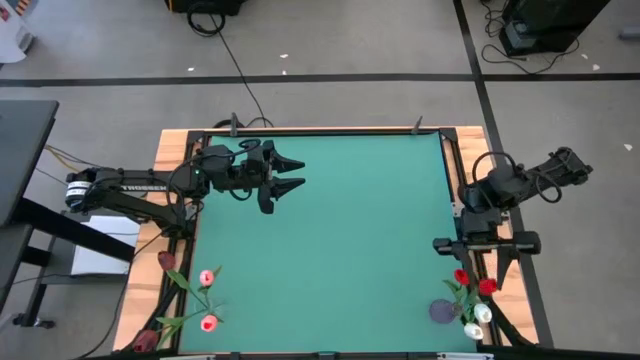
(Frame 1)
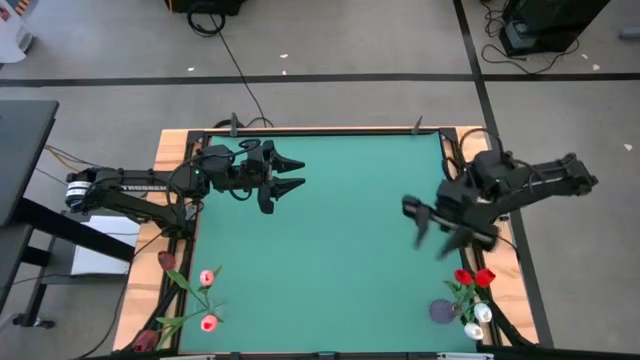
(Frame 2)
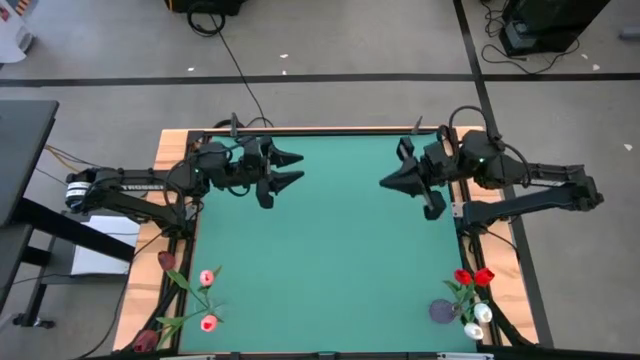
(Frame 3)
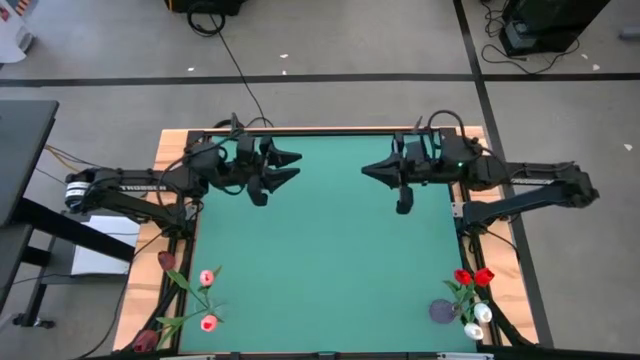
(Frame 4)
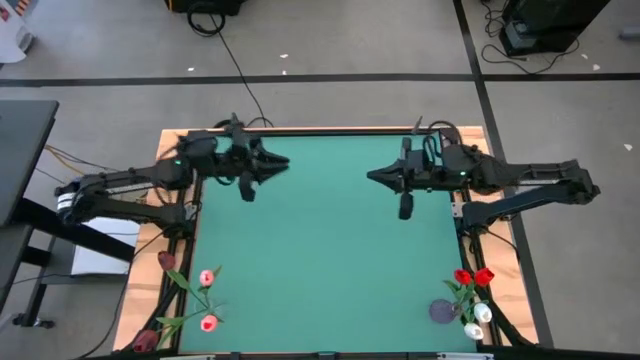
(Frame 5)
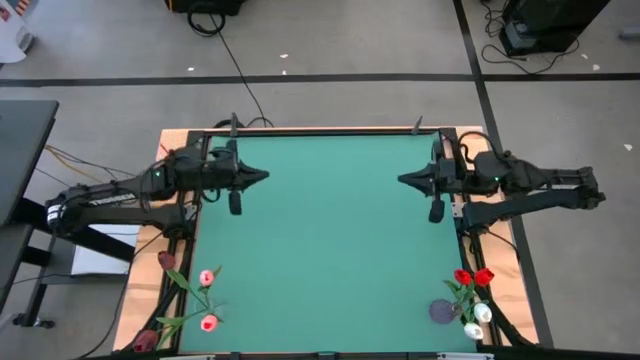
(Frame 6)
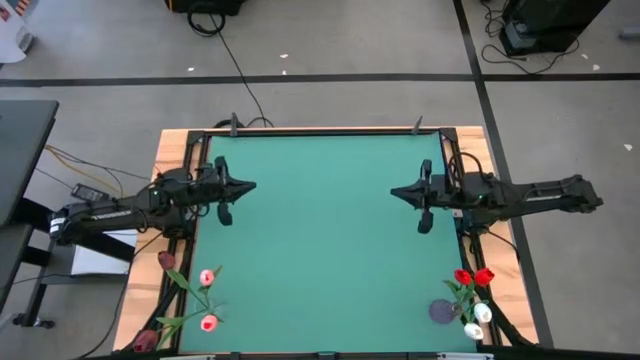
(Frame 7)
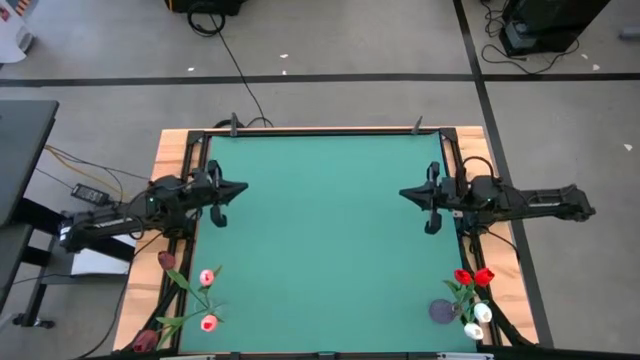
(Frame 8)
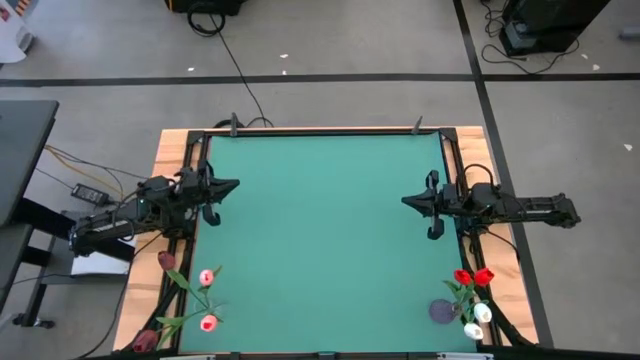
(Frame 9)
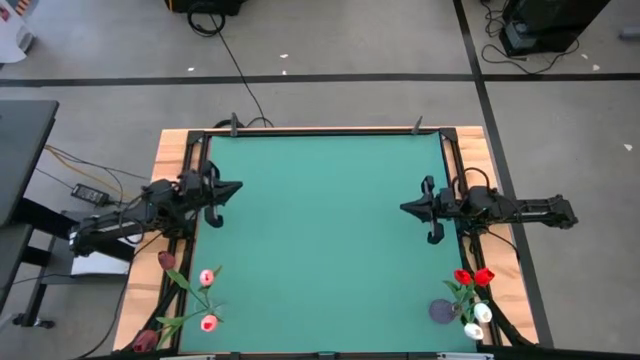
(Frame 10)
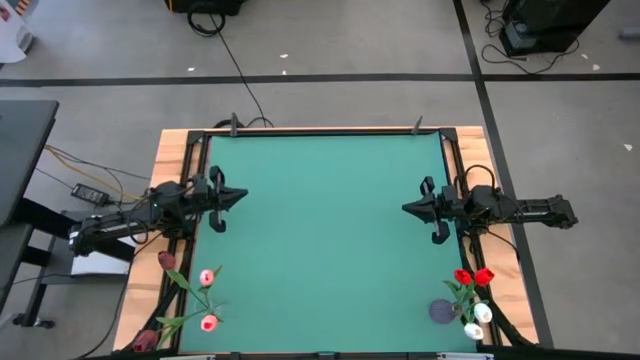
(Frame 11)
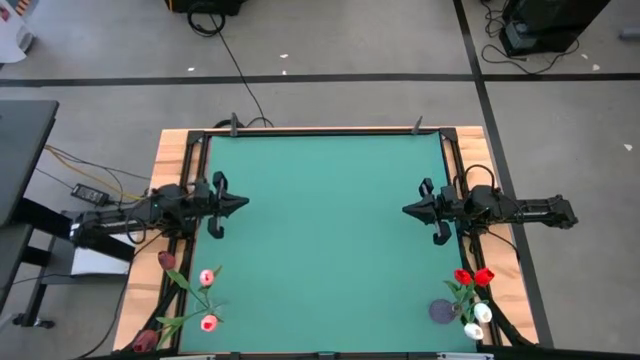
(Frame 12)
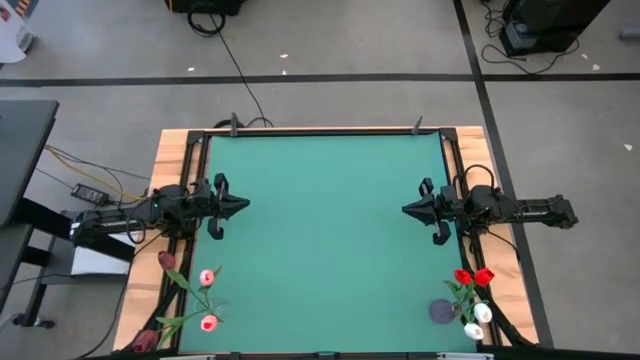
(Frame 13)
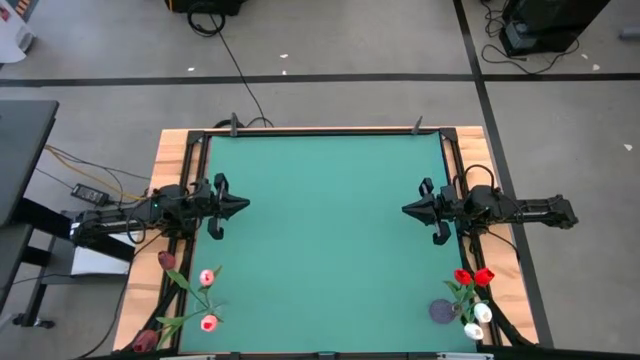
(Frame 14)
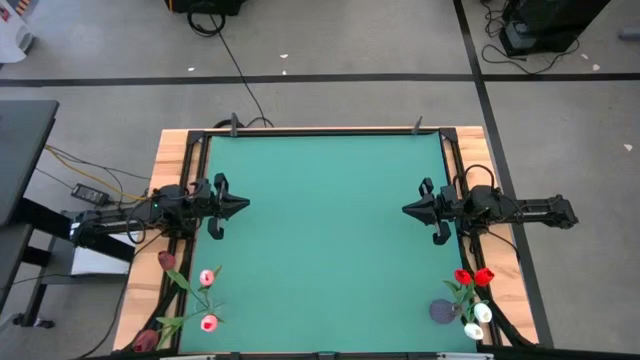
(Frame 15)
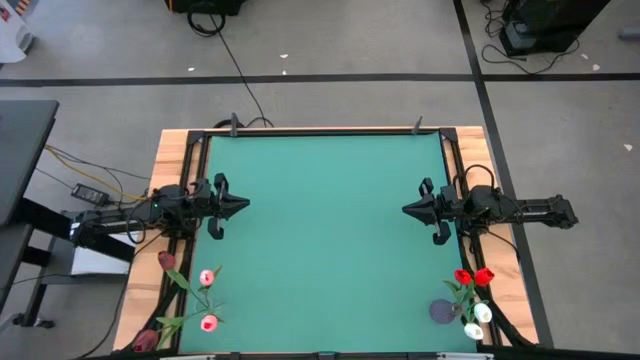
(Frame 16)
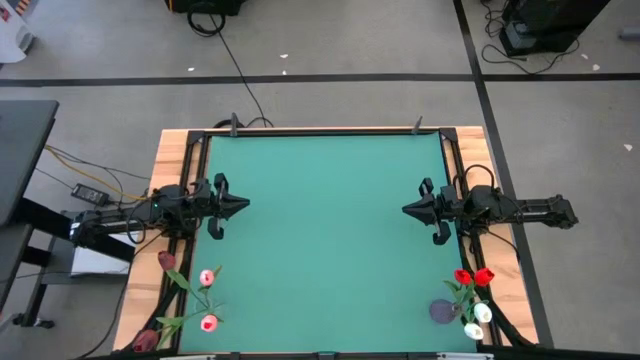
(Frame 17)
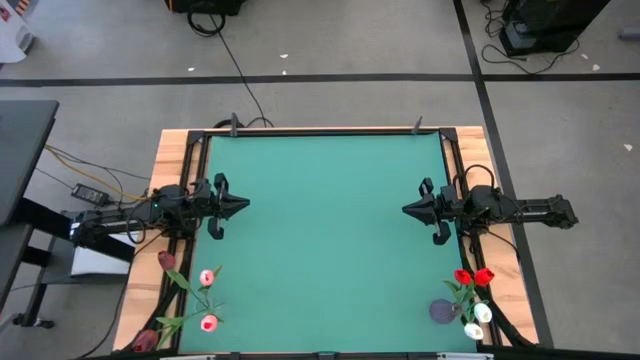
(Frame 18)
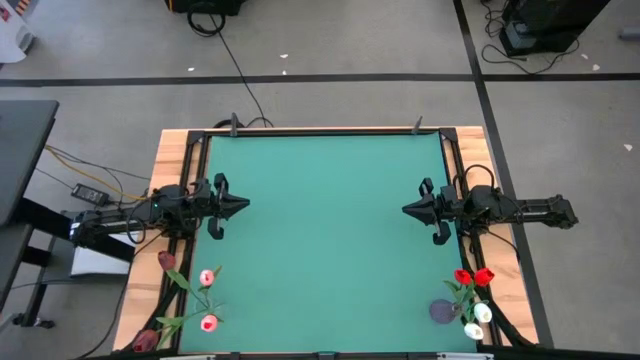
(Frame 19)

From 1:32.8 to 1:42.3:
Task: Sort flowers into vase by color
Return to Home Position

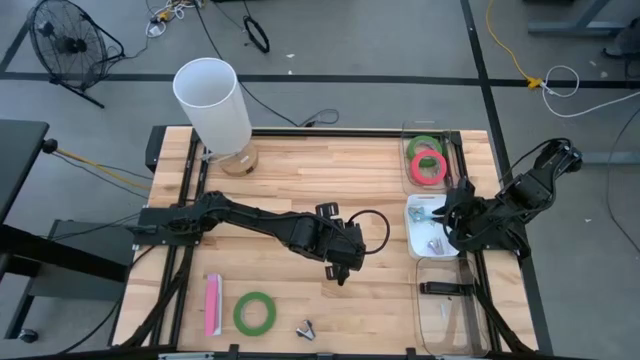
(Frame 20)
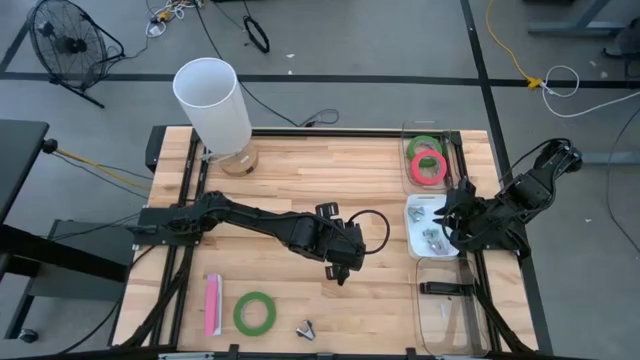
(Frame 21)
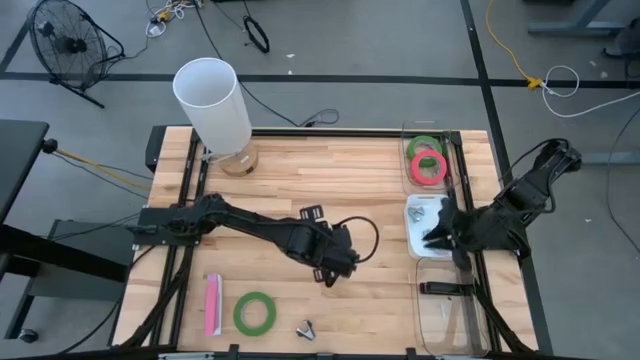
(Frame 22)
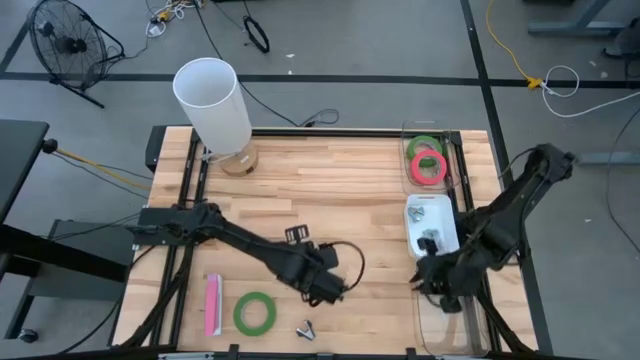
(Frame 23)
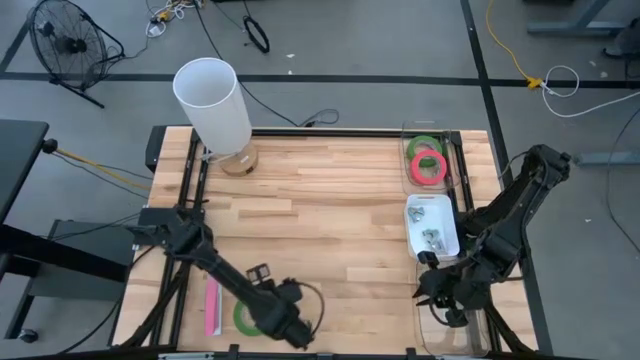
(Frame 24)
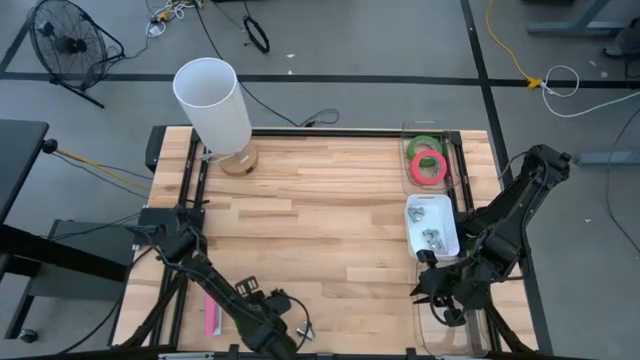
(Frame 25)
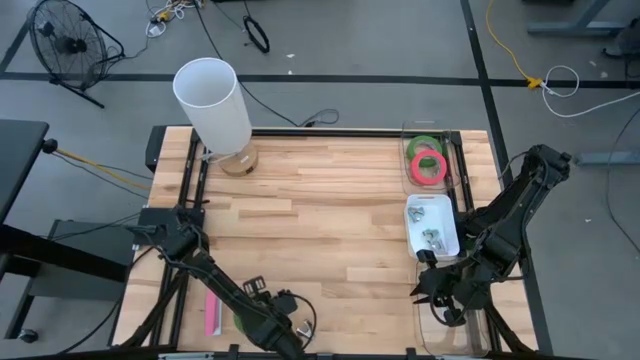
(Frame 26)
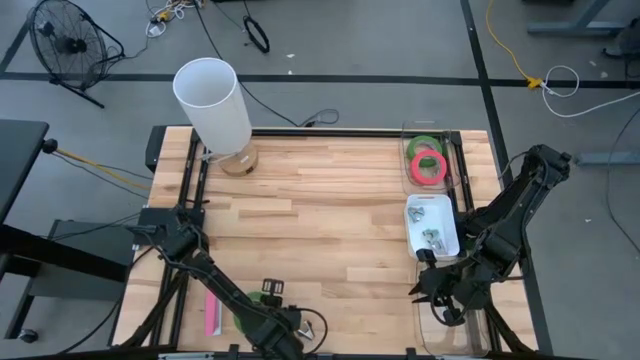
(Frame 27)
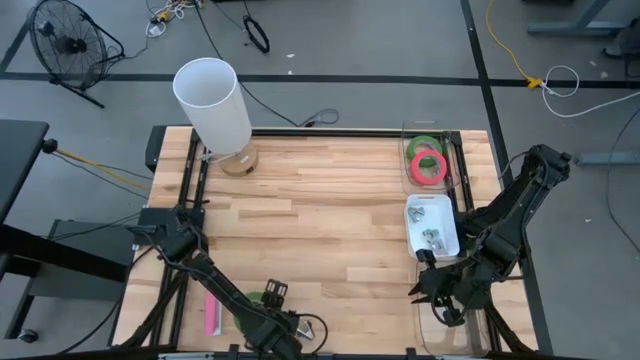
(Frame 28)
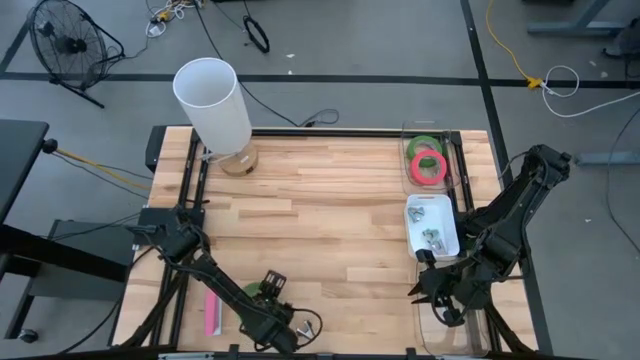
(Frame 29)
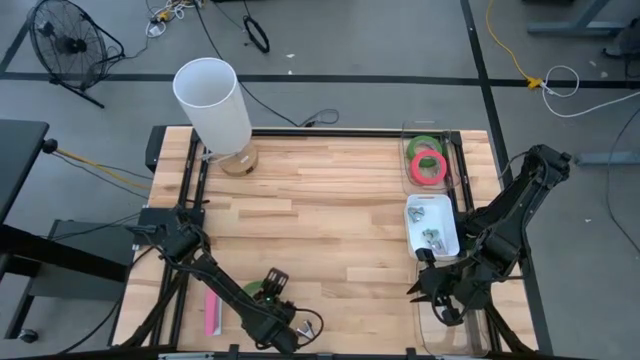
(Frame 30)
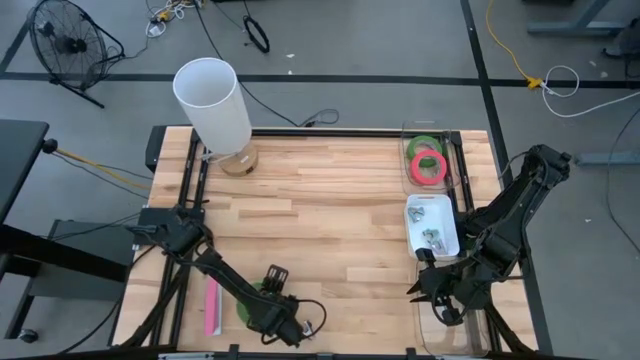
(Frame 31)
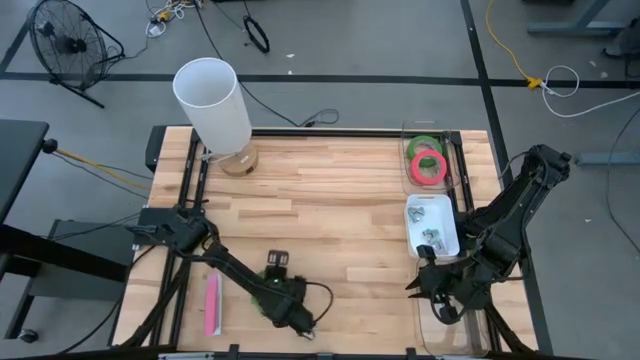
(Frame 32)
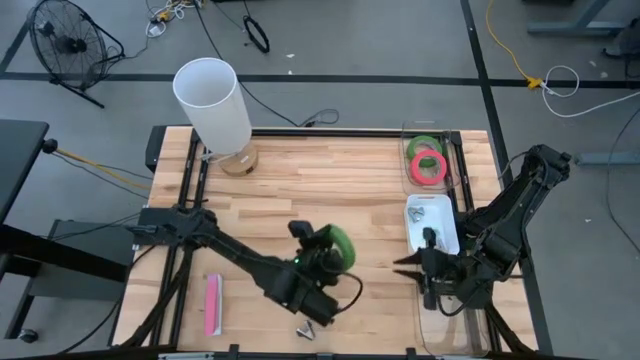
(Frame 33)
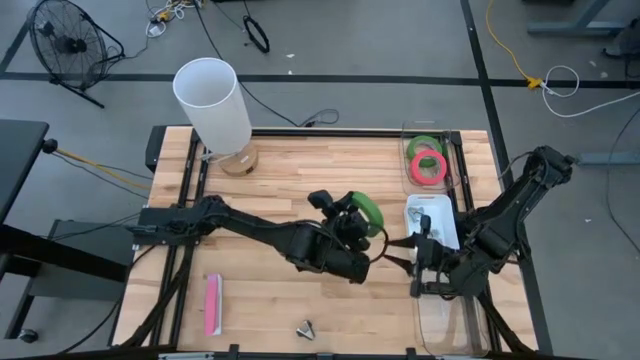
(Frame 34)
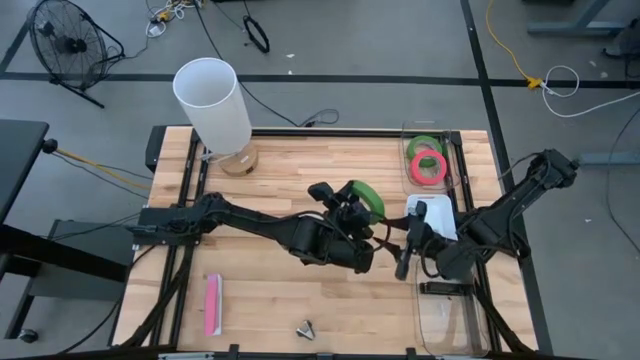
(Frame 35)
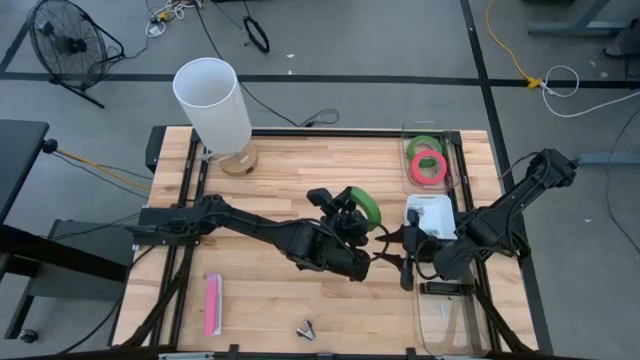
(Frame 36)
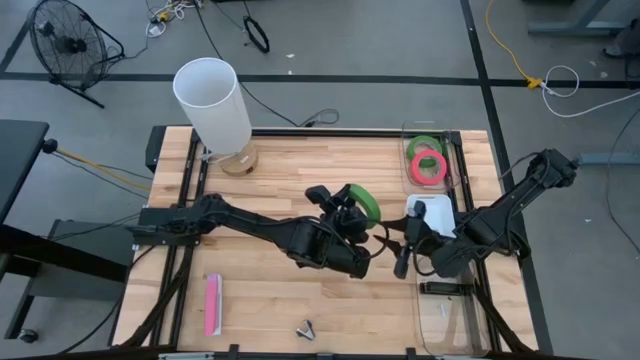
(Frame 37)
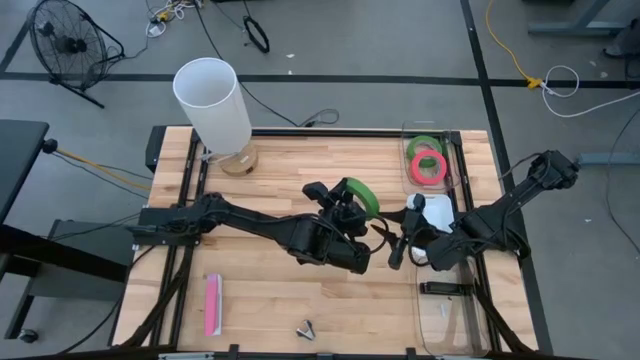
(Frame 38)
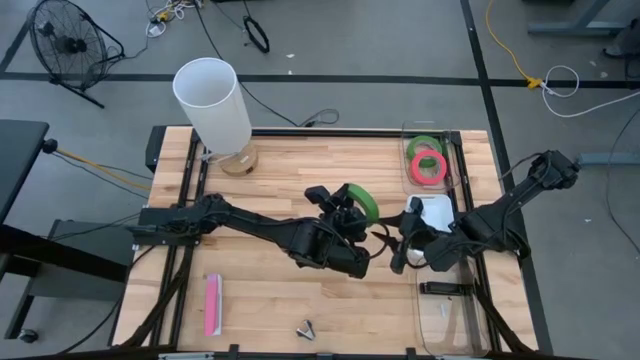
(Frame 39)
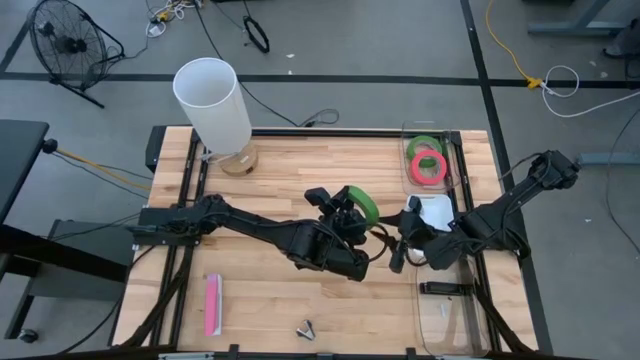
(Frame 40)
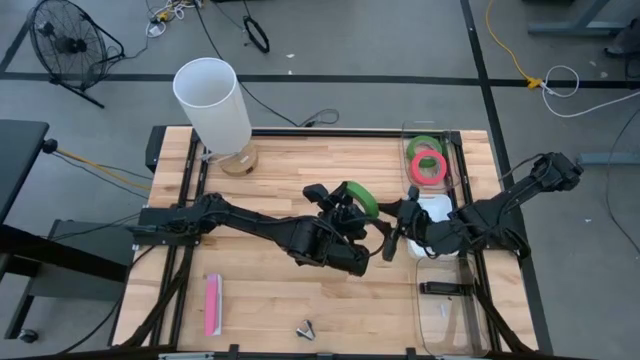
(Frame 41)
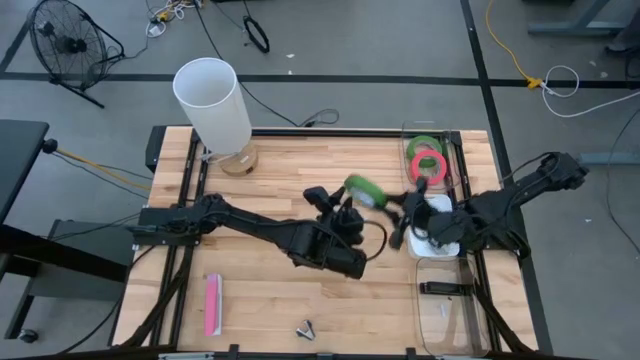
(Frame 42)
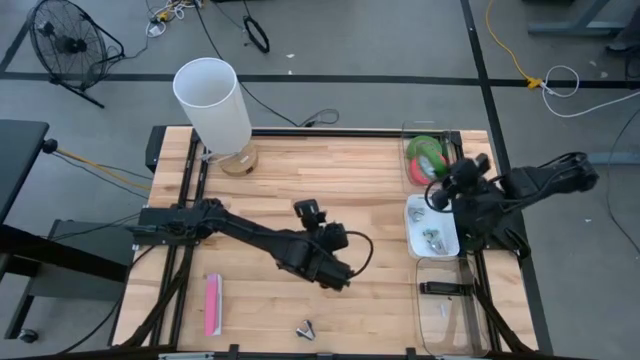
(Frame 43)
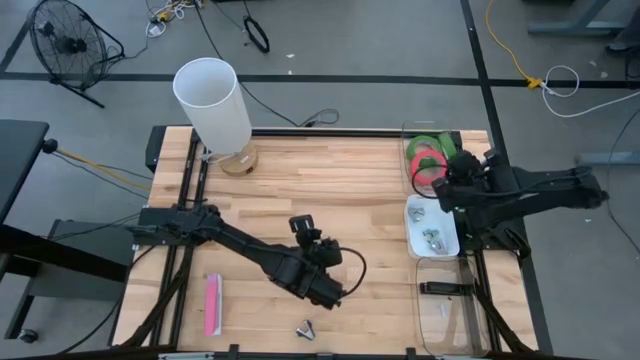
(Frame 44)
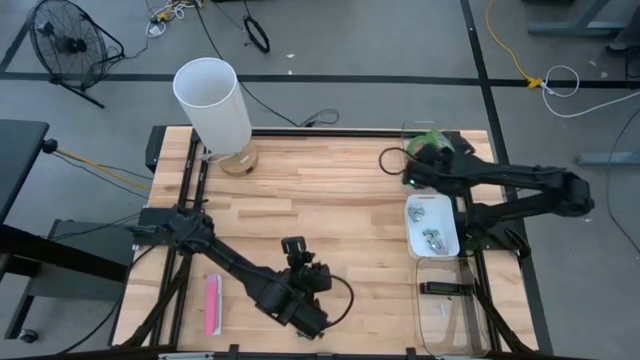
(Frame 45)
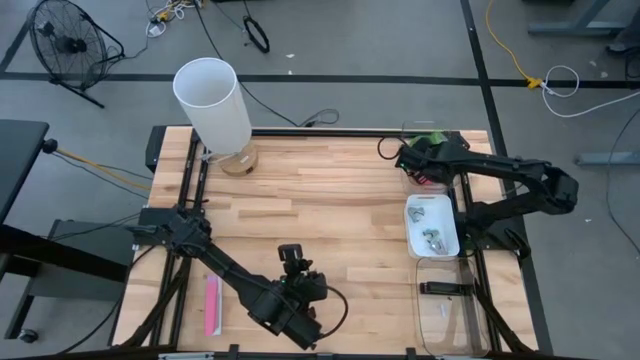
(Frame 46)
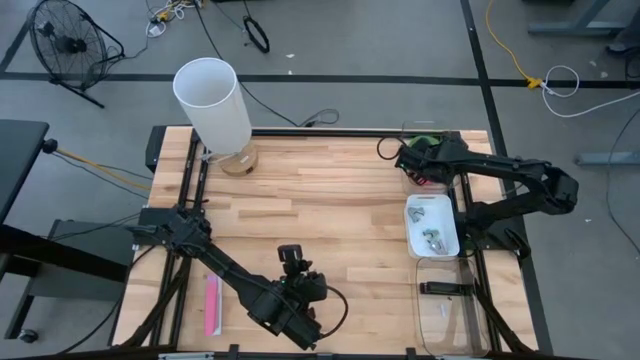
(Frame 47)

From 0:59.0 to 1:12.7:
Task: Pick and place Stapler, Stapler remover, tape
Put the green masking tape into the top transparent bin
